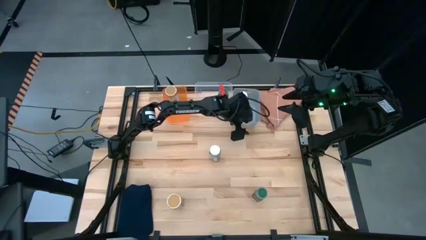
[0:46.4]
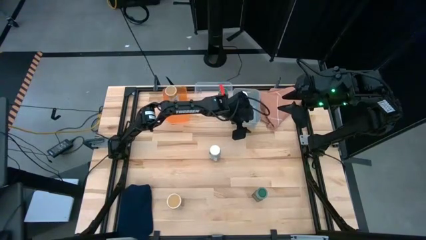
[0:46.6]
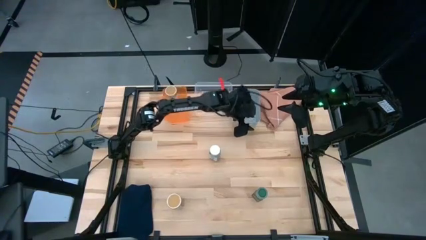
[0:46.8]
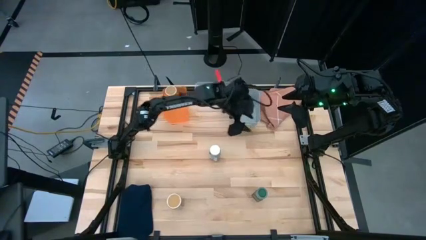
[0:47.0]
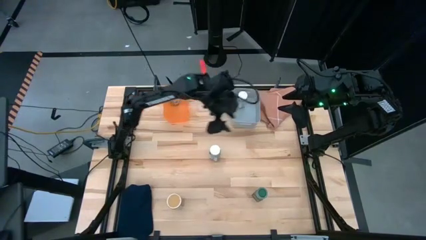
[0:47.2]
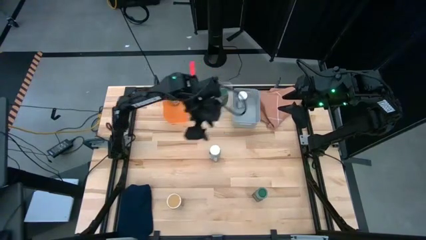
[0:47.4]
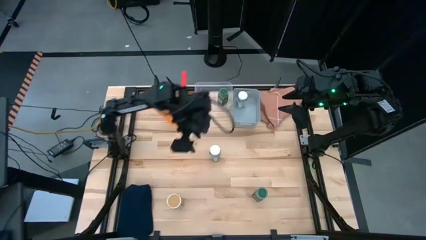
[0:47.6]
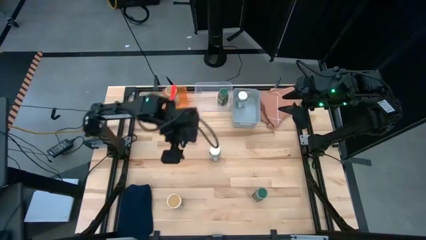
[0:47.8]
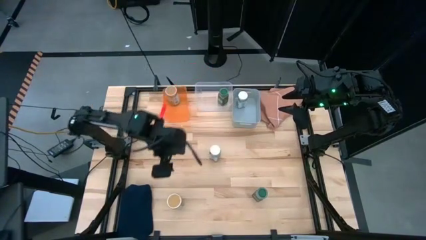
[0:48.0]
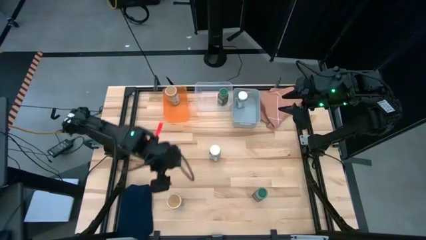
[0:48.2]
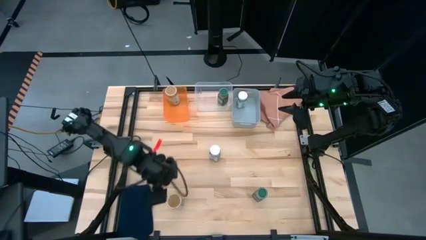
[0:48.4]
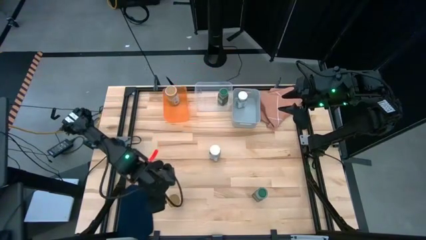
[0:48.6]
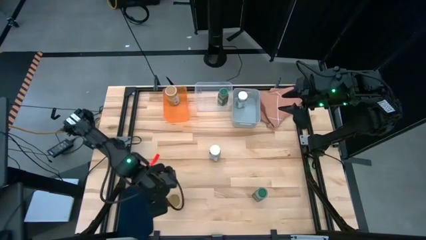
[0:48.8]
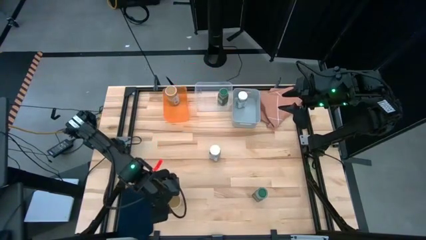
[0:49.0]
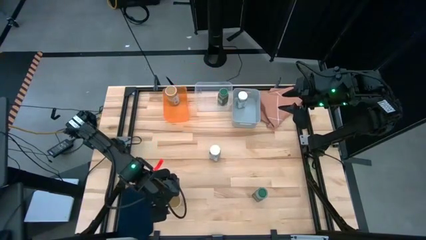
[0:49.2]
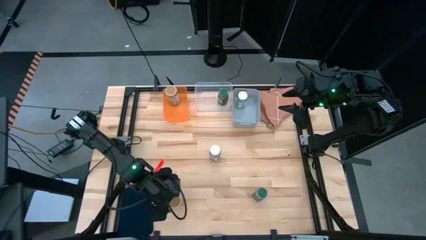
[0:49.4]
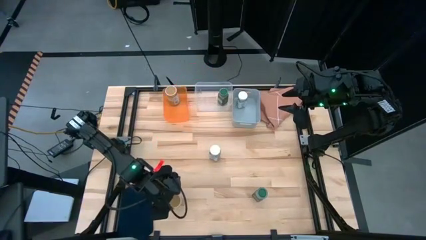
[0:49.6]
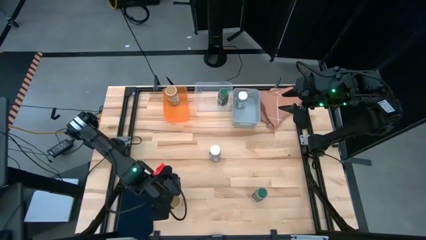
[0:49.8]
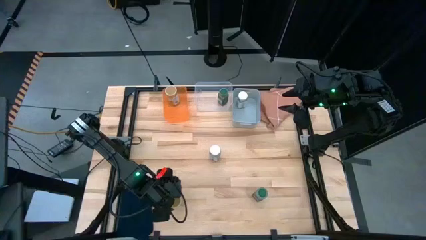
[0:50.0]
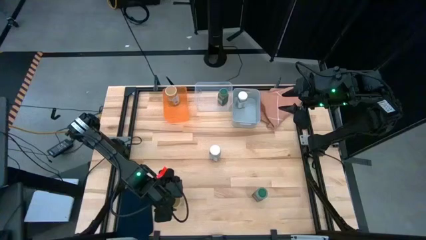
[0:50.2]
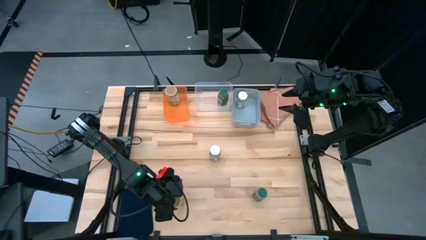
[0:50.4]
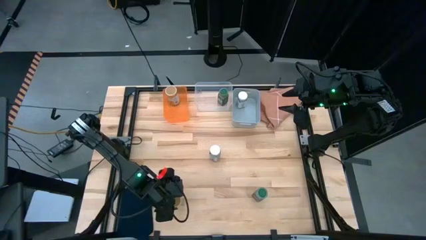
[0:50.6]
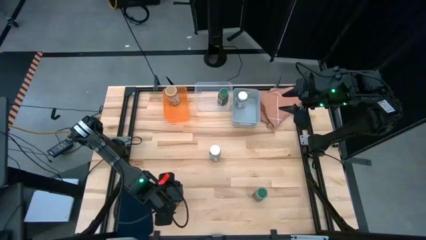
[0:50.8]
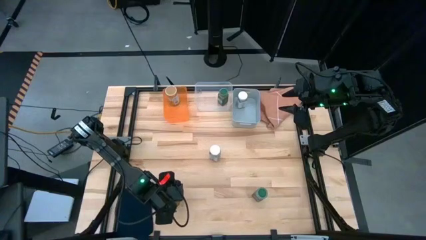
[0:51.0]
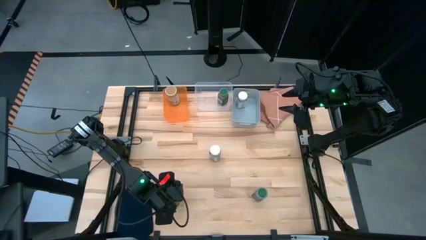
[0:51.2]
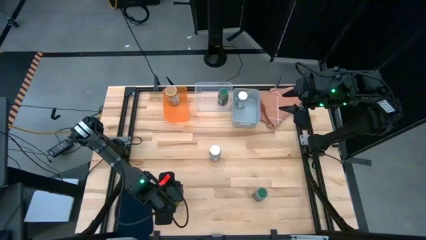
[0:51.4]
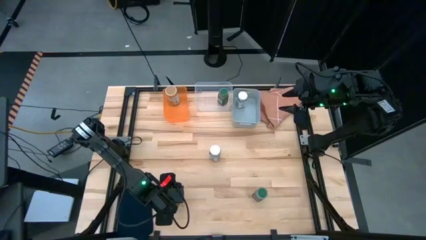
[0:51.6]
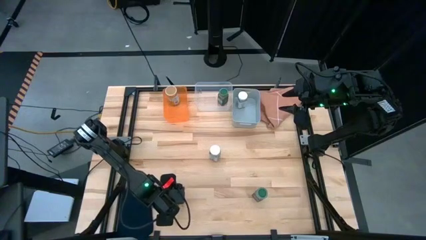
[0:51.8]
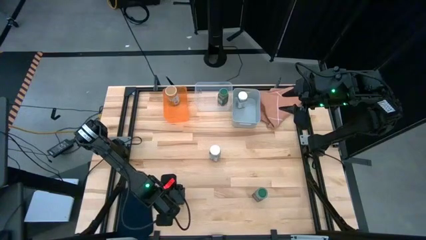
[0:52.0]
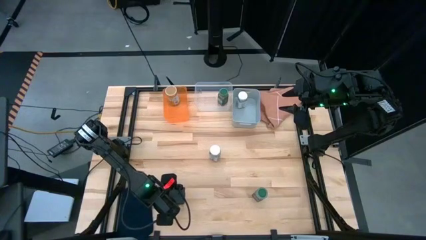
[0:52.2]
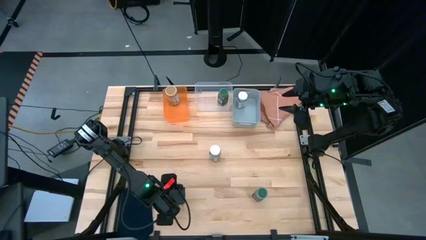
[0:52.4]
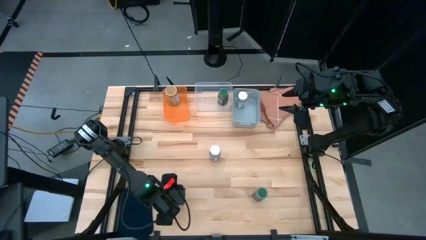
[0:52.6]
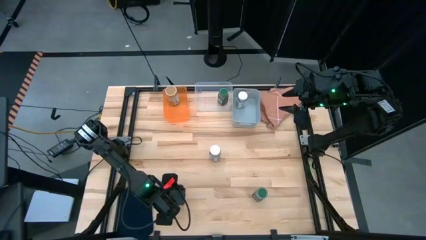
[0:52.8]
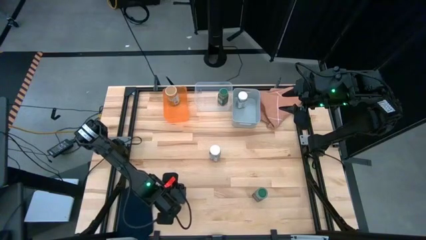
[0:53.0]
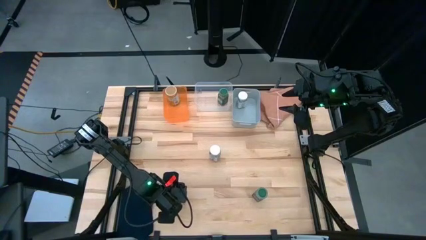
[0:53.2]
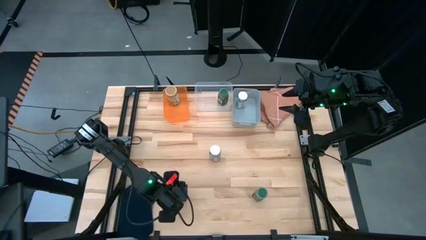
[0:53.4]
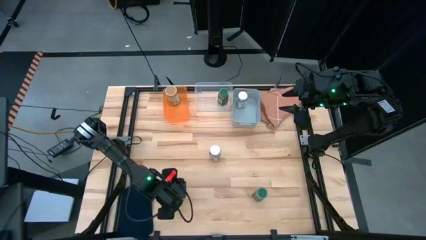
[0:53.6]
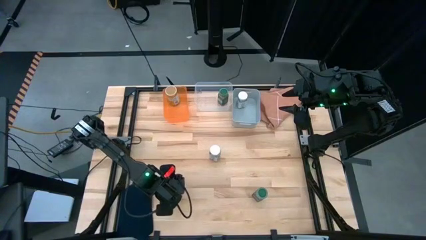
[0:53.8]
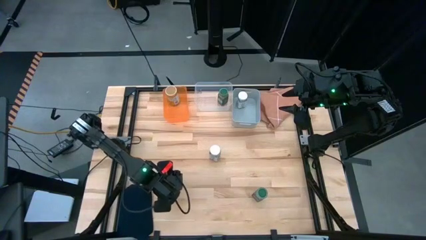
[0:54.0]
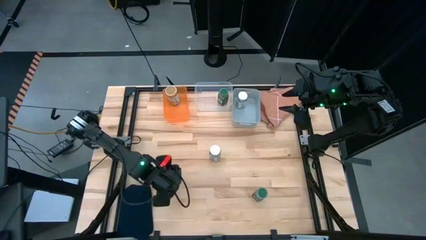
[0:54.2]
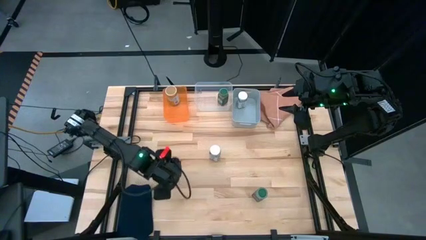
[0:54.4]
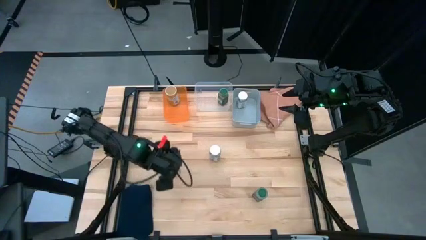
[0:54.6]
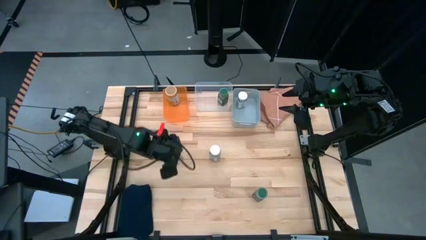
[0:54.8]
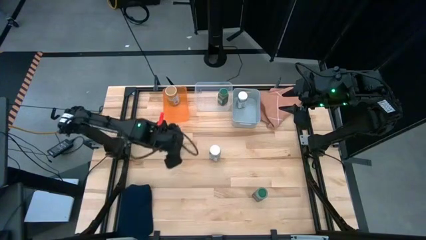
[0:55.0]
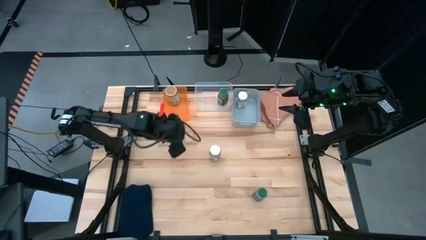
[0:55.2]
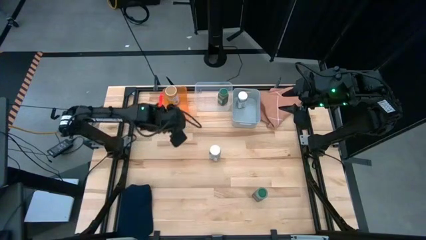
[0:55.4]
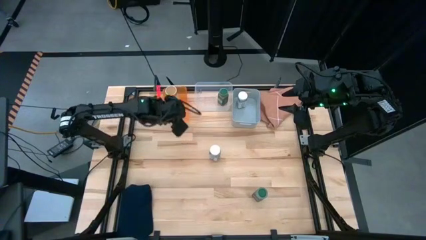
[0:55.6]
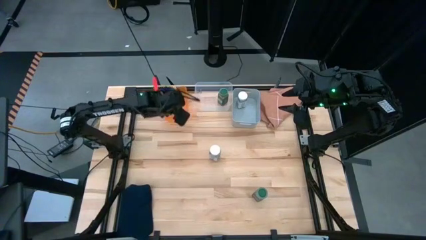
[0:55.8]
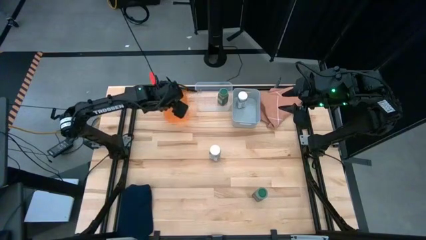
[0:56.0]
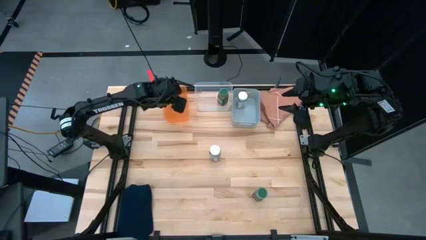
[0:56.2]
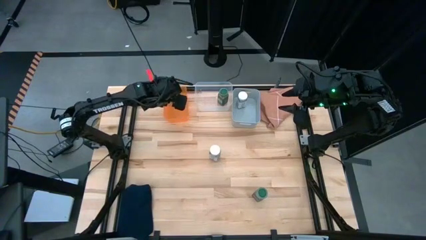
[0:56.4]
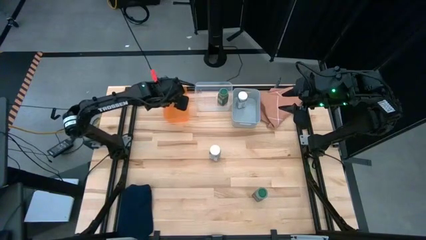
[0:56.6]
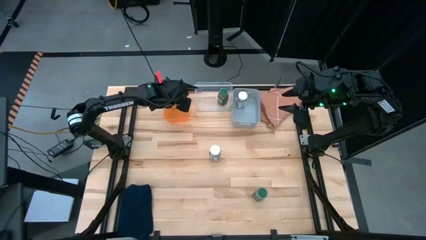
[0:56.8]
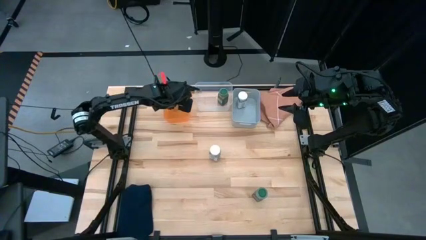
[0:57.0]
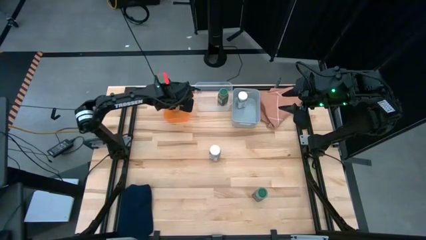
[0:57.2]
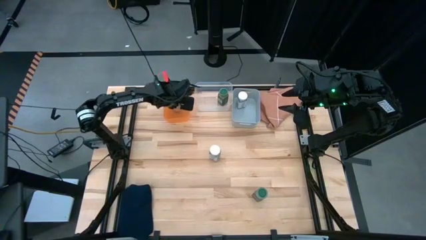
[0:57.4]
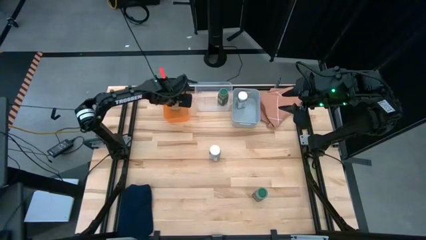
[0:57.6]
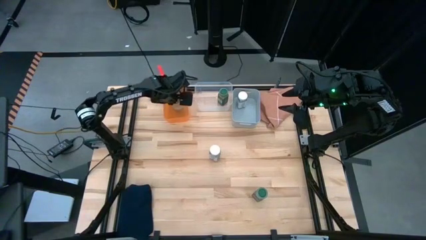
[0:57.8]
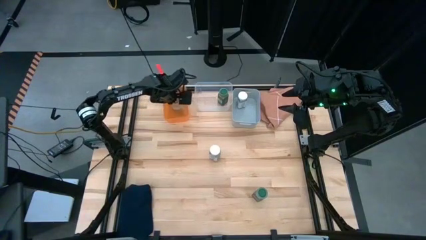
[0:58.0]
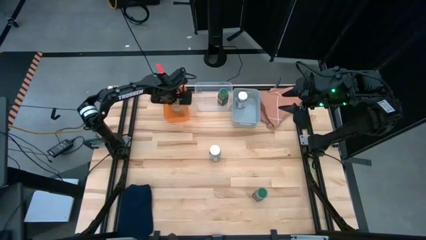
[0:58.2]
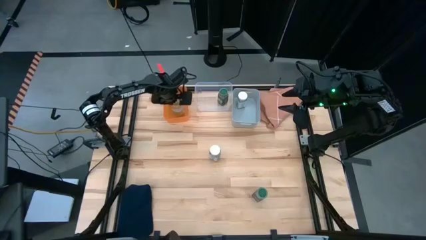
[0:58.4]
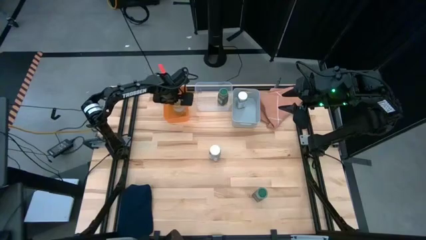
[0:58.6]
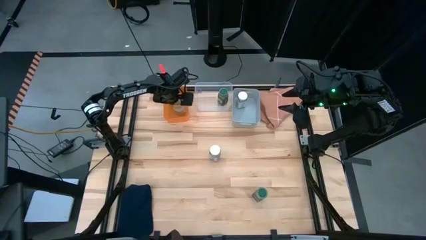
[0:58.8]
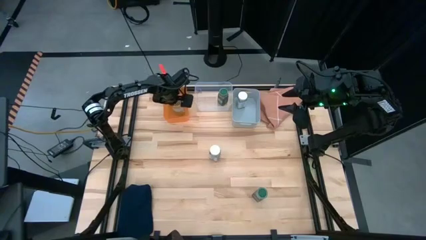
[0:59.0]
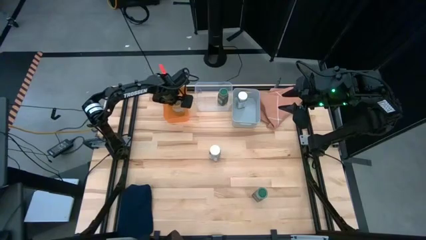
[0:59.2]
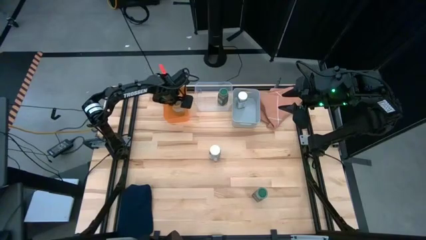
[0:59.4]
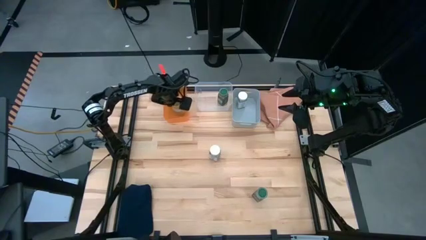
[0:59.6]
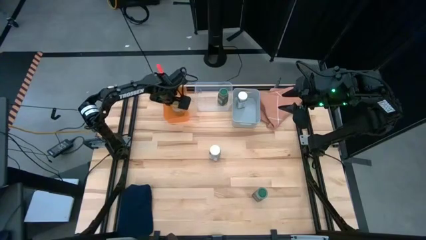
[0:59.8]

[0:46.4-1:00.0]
Task: Sort spices by type
Put the gold seasoning bottle into the orange bin
